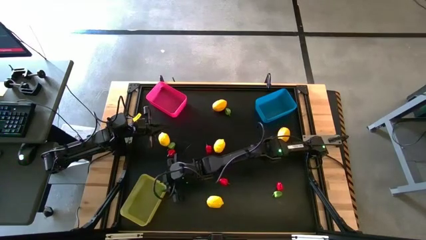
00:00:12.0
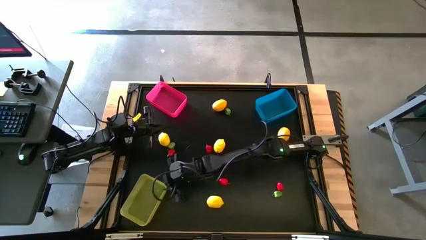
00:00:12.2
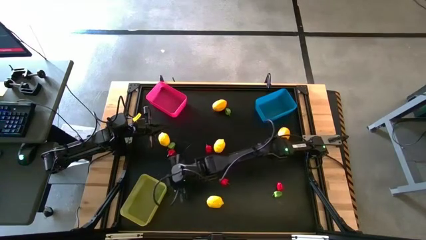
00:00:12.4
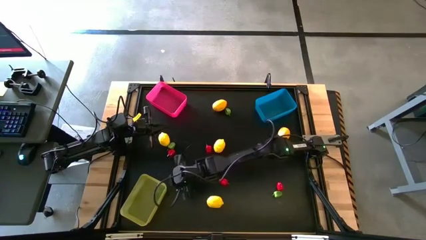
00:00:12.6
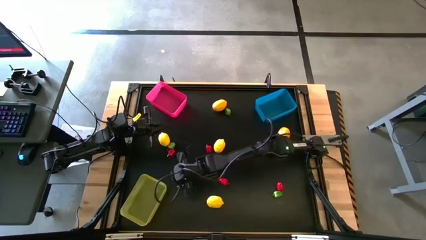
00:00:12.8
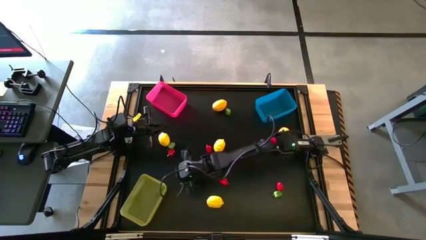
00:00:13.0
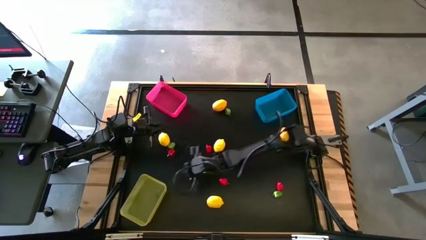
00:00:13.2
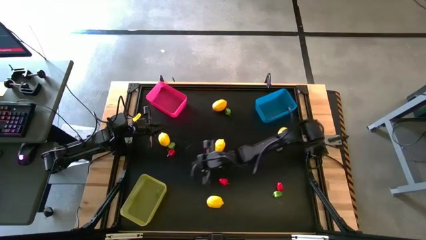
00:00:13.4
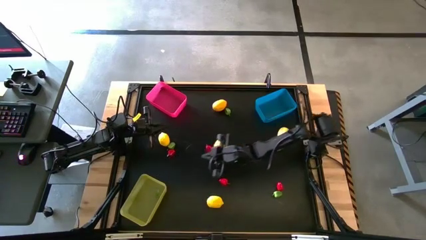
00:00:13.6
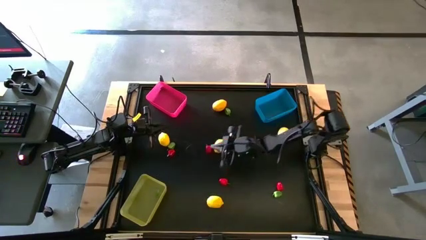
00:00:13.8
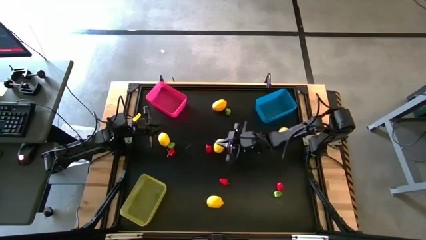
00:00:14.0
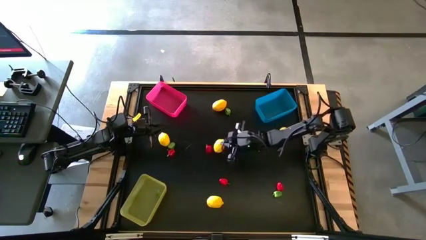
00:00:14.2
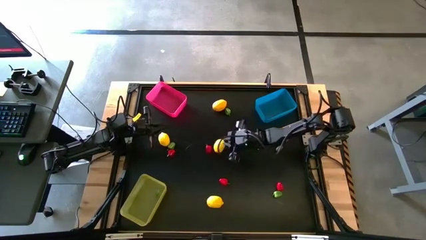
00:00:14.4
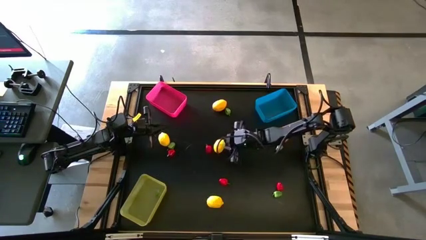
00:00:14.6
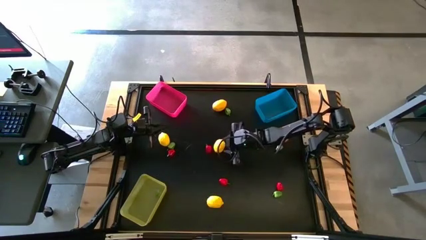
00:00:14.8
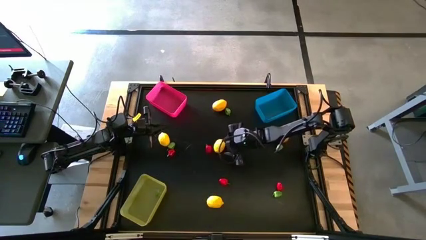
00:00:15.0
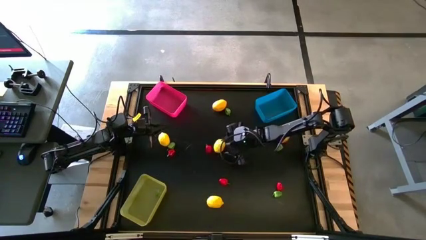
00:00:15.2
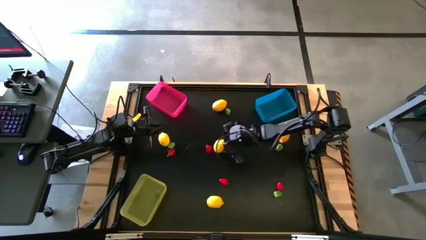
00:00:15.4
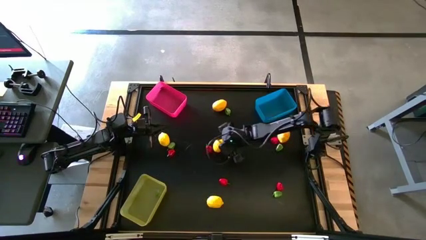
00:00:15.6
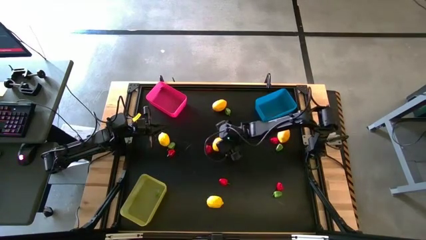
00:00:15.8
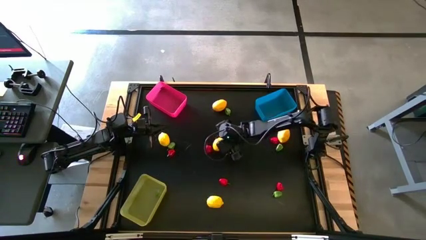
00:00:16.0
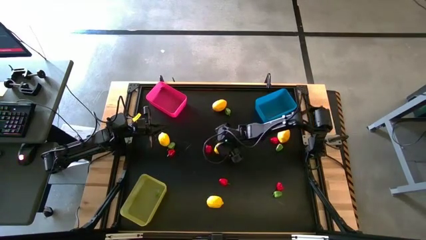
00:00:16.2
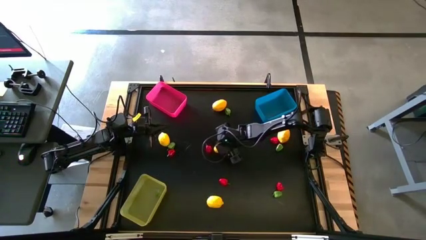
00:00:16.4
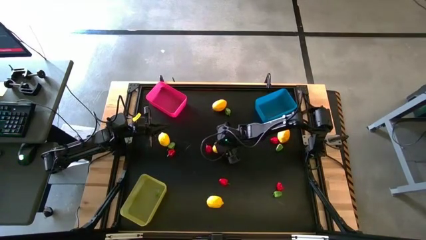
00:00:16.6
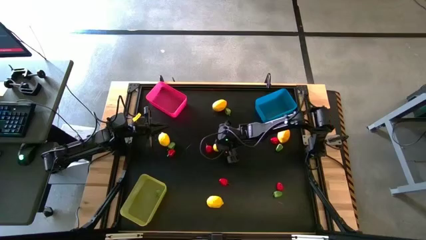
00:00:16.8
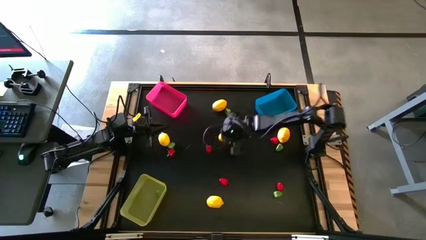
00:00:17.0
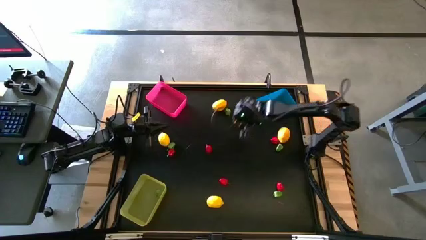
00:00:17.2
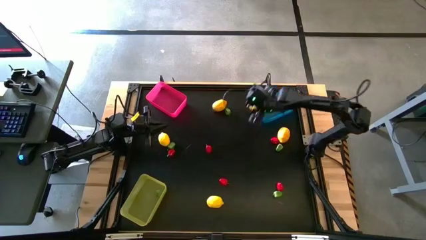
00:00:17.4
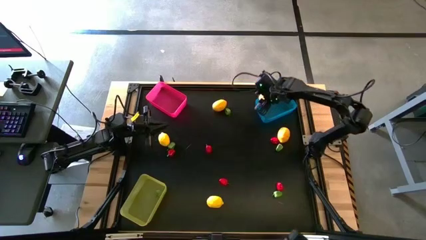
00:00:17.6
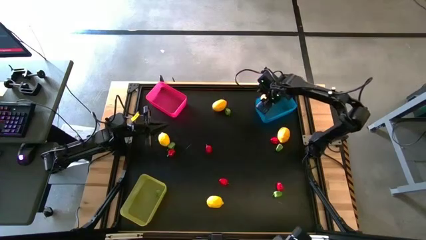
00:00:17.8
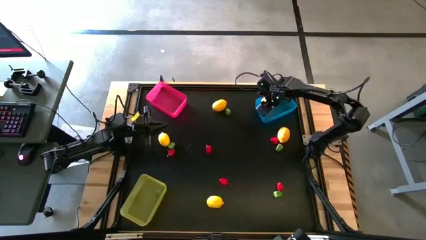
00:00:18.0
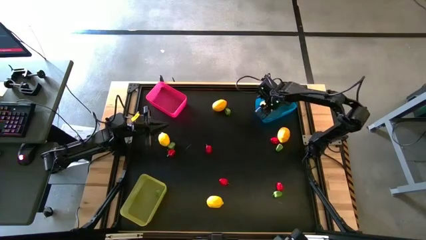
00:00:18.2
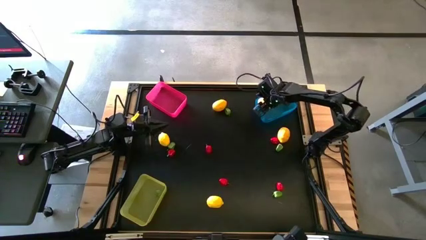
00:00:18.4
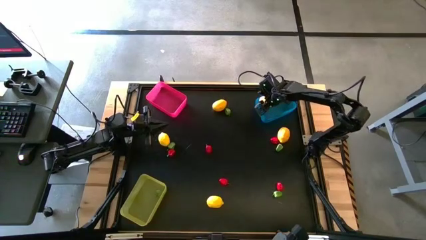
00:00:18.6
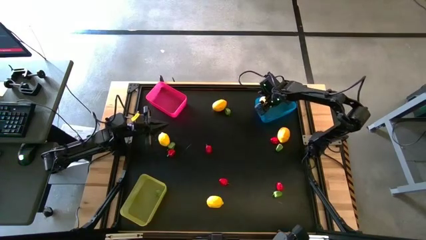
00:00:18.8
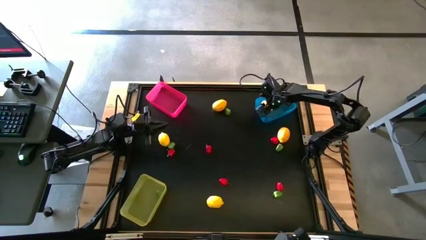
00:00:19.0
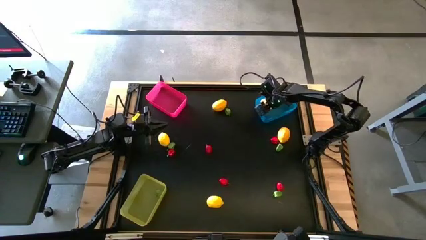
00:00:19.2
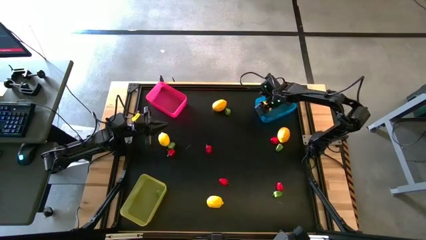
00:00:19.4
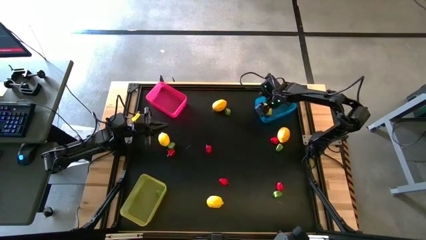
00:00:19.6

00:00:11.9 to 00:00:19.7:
Task: Sort produce into baskets
Put the yellow lemon into the blue bin

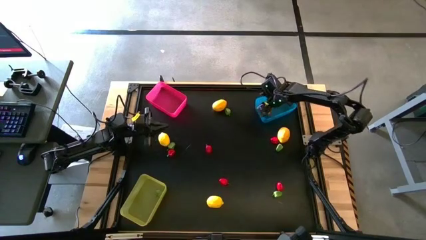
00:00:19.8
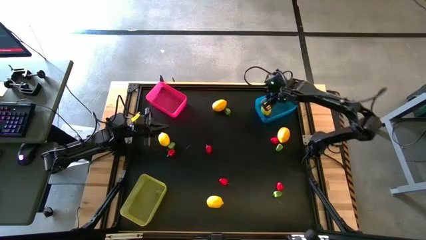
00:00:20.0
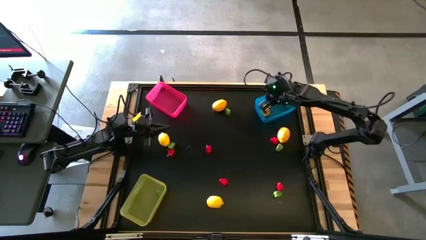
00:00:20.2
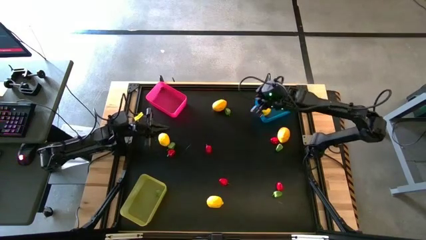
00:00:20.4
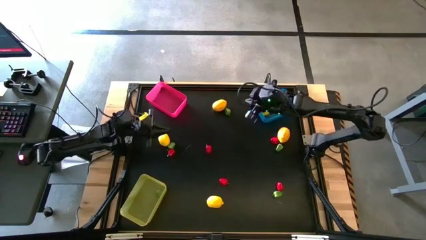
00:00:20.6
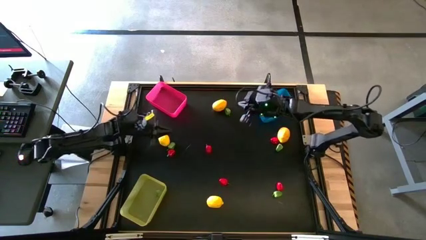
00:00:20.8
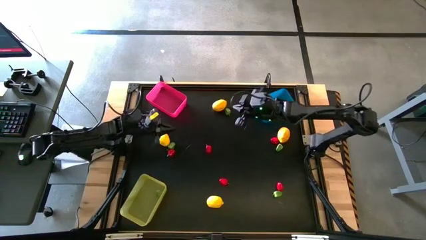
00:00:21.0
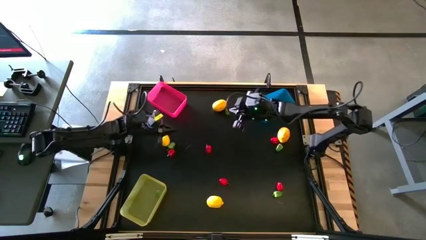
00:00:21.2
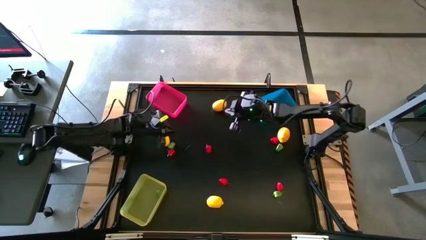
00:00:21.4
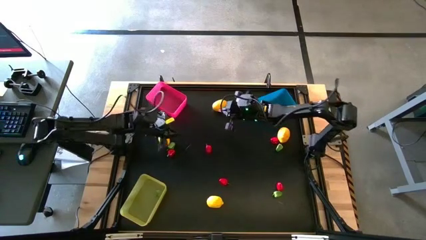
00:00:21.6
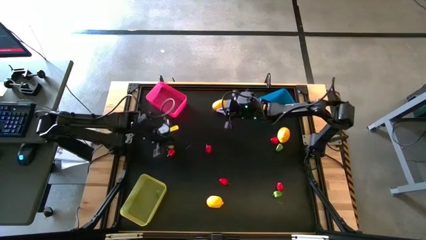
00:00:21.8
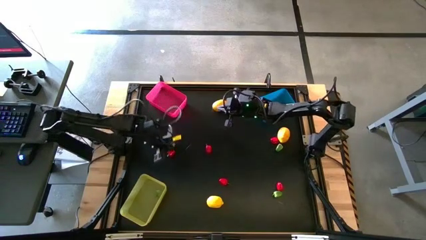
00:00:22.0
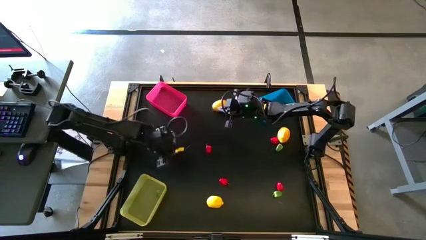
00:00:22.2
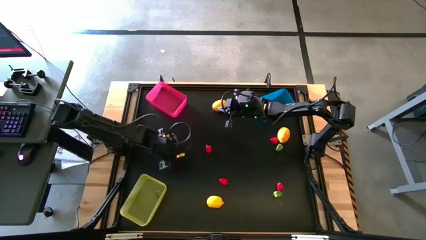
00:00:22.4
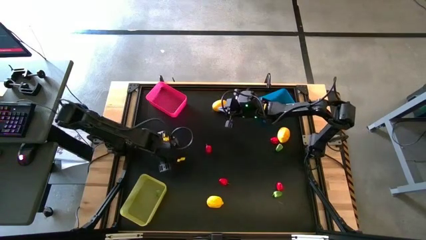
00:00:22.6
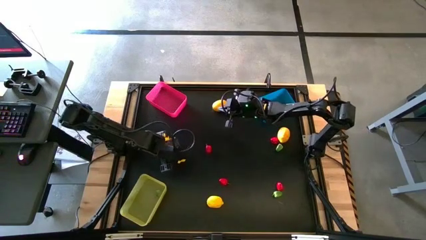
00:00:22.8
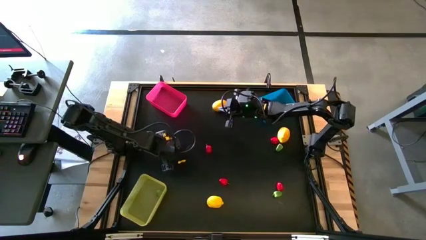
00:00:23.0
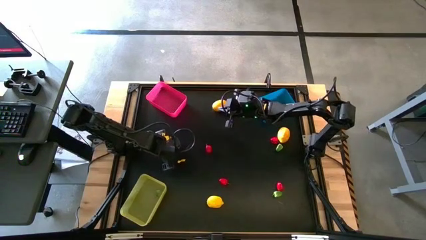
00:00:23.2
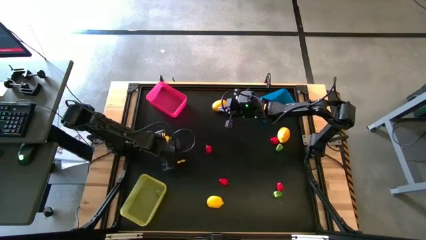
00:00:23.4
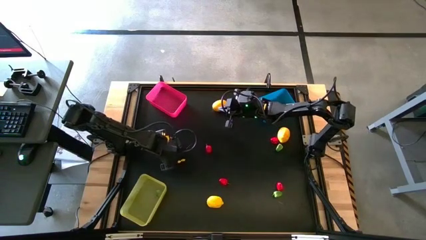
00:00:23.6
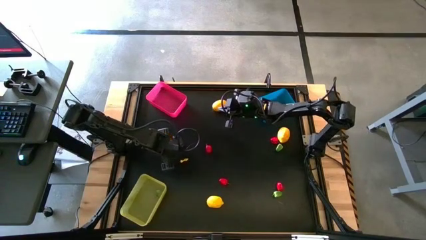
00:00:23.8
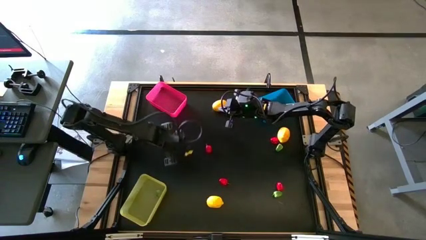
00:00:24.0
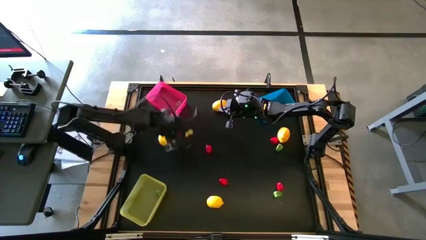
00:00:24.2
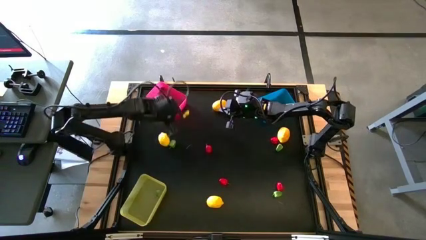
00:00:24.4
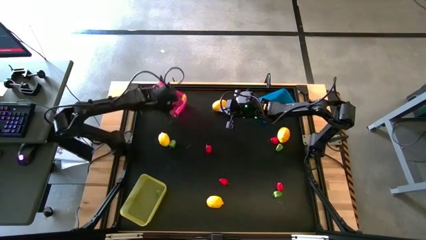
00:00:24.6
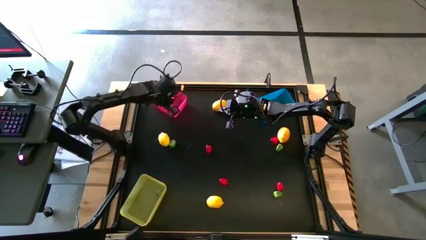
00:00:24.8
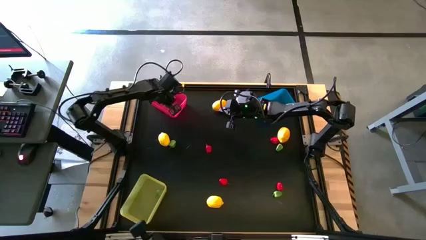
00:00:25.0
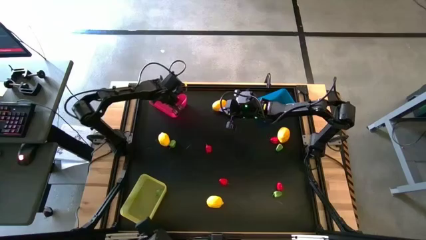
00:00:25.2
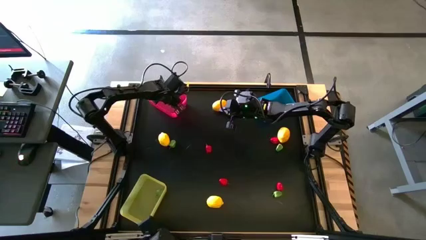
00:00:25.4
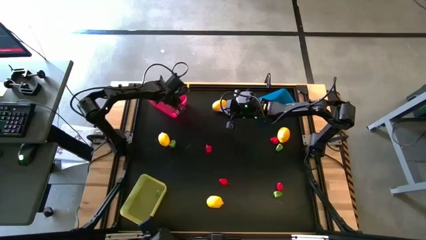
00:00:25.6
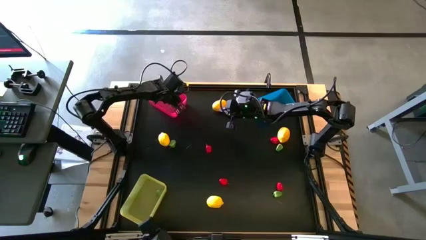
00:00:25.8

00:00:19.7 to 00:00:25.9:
Put the red bell pepper into the red bin
